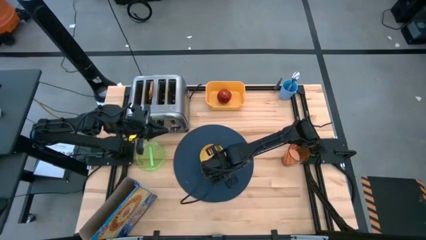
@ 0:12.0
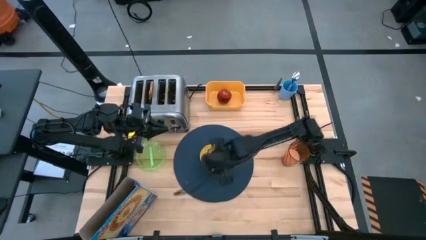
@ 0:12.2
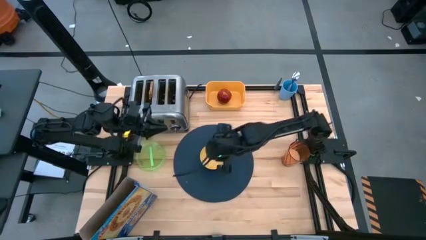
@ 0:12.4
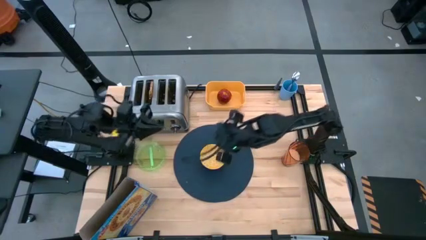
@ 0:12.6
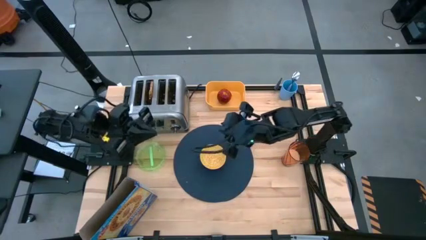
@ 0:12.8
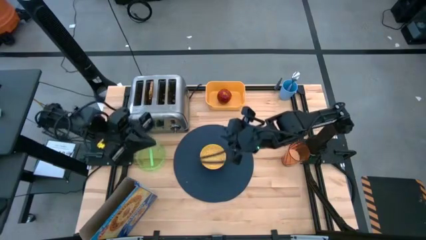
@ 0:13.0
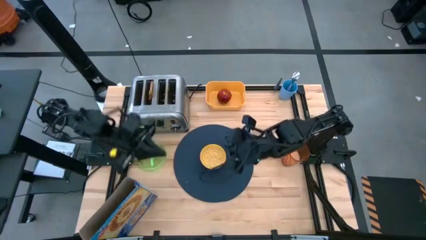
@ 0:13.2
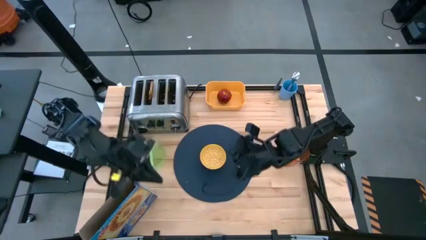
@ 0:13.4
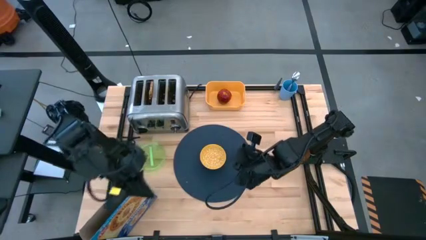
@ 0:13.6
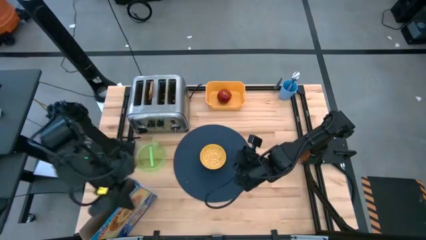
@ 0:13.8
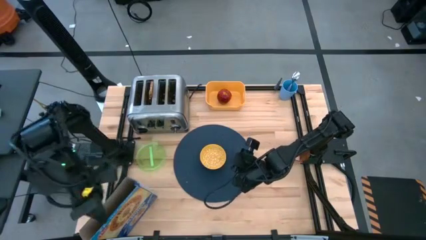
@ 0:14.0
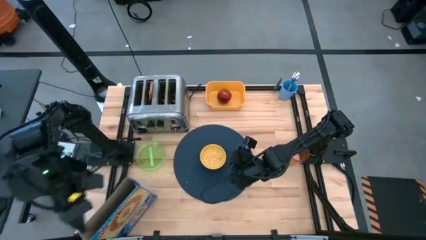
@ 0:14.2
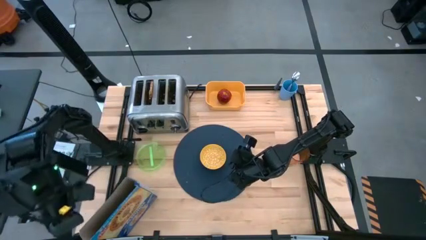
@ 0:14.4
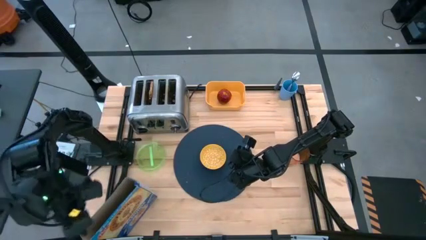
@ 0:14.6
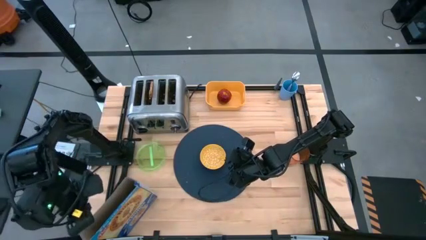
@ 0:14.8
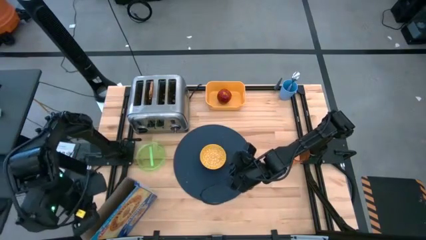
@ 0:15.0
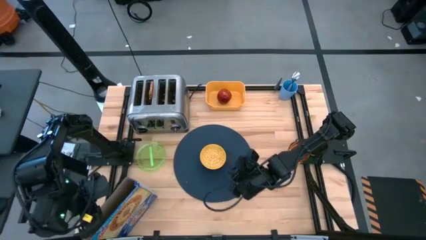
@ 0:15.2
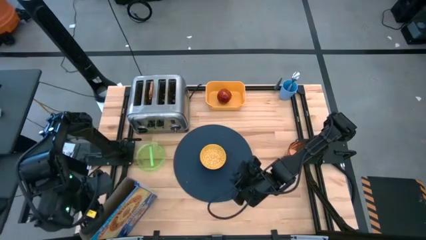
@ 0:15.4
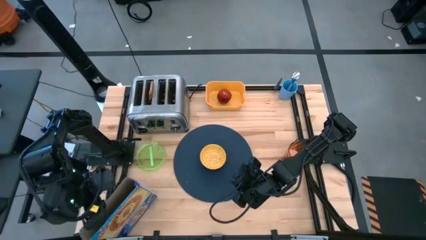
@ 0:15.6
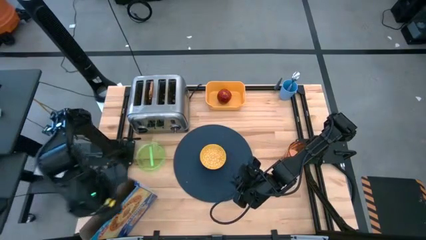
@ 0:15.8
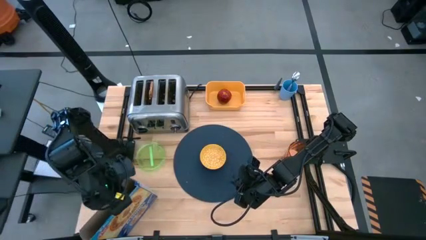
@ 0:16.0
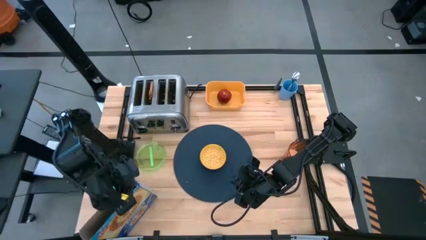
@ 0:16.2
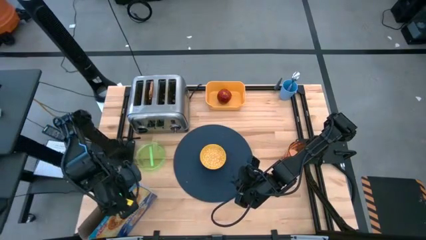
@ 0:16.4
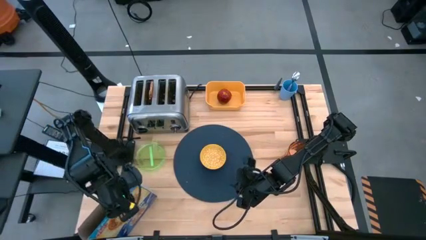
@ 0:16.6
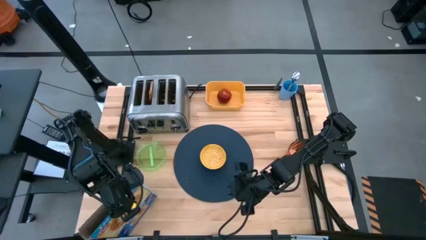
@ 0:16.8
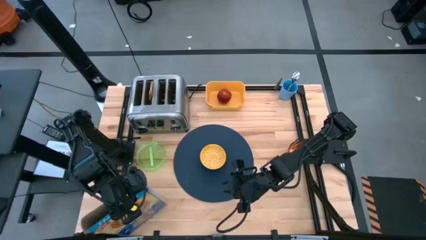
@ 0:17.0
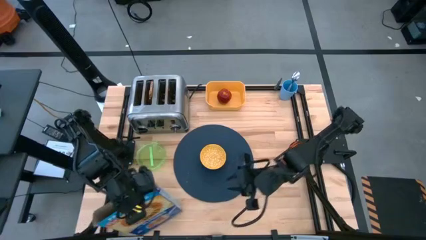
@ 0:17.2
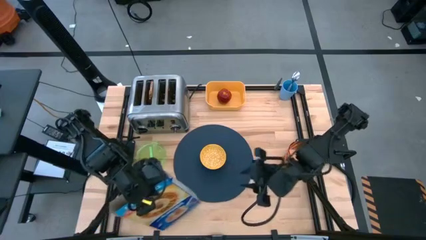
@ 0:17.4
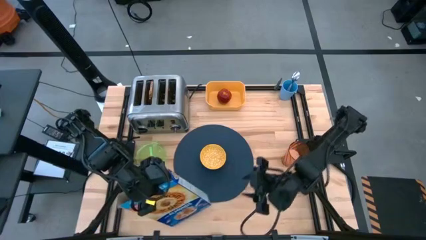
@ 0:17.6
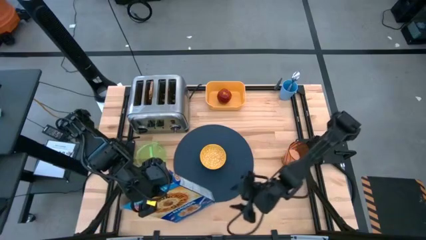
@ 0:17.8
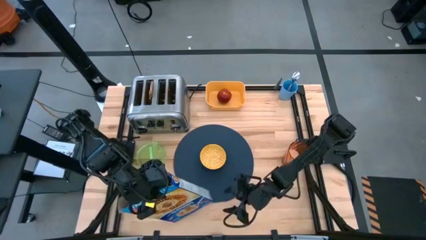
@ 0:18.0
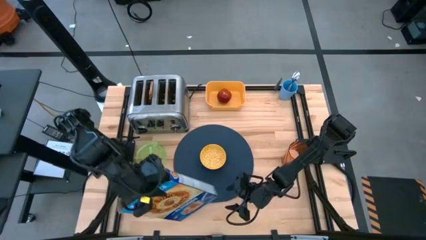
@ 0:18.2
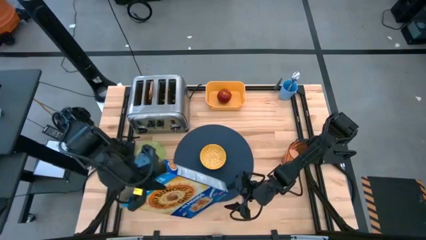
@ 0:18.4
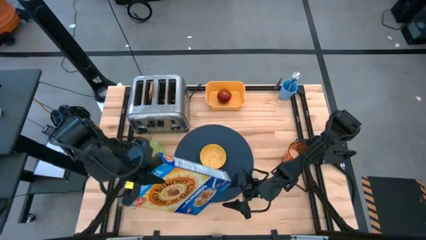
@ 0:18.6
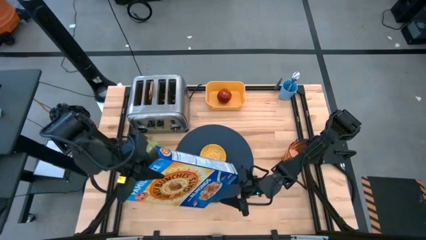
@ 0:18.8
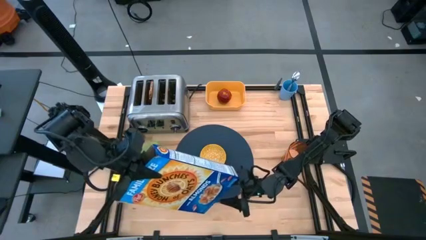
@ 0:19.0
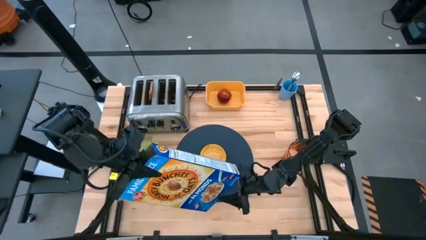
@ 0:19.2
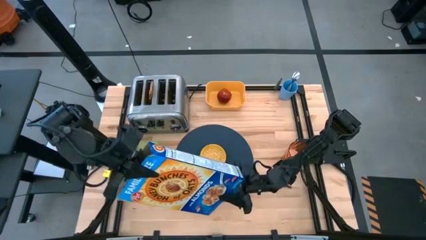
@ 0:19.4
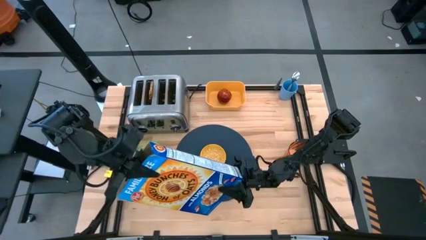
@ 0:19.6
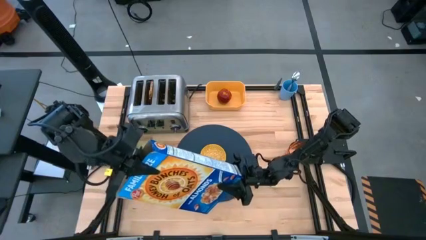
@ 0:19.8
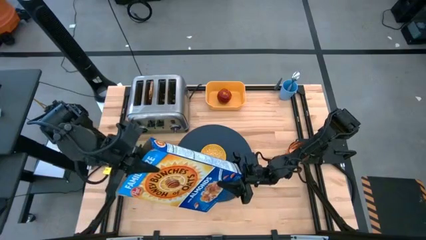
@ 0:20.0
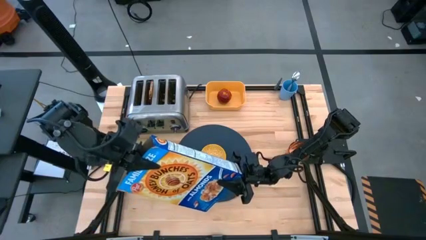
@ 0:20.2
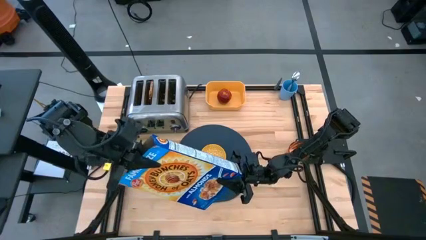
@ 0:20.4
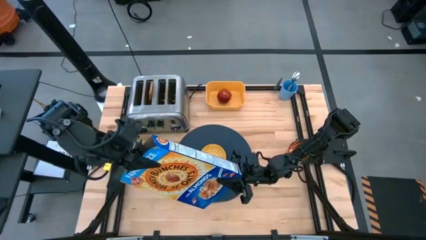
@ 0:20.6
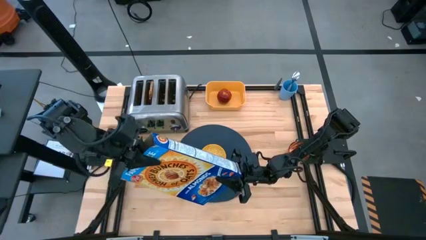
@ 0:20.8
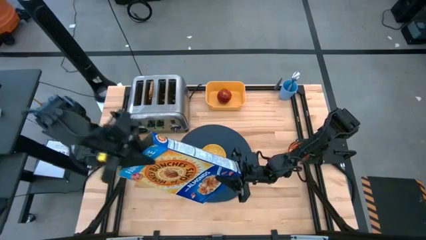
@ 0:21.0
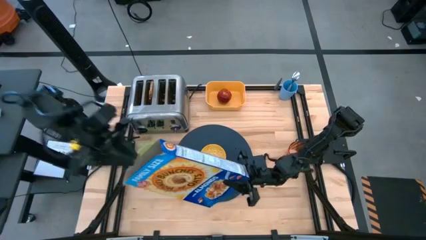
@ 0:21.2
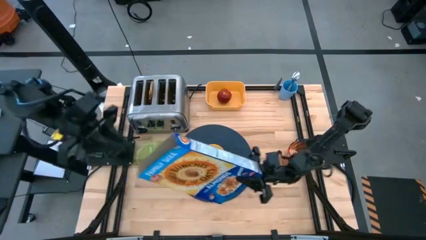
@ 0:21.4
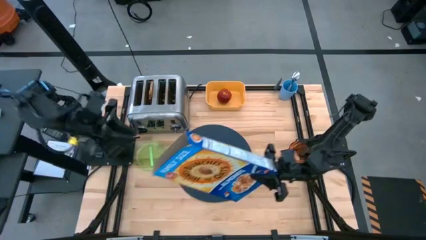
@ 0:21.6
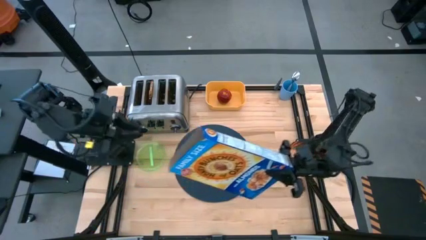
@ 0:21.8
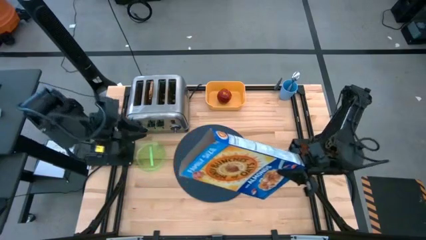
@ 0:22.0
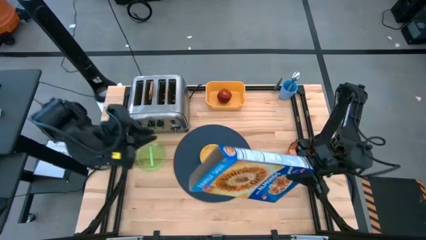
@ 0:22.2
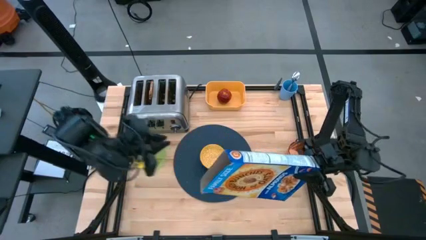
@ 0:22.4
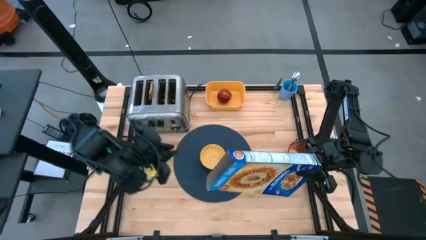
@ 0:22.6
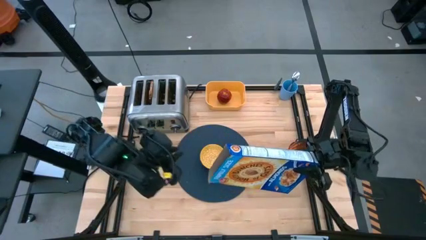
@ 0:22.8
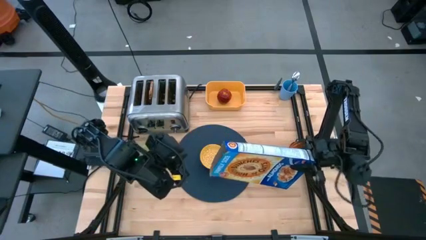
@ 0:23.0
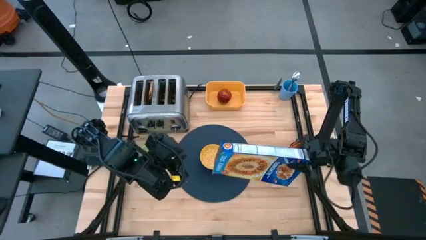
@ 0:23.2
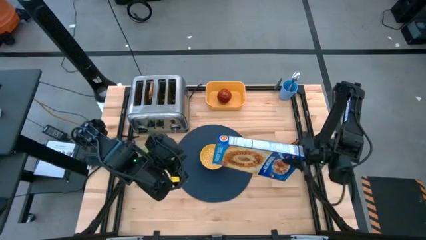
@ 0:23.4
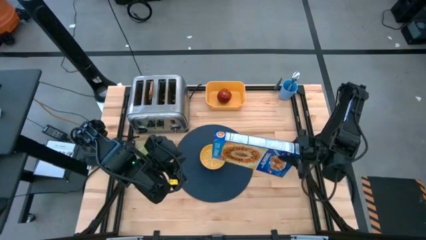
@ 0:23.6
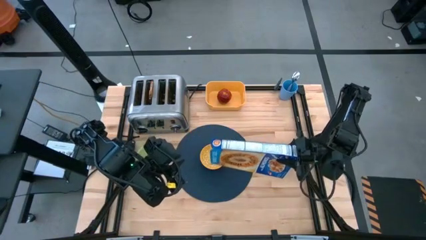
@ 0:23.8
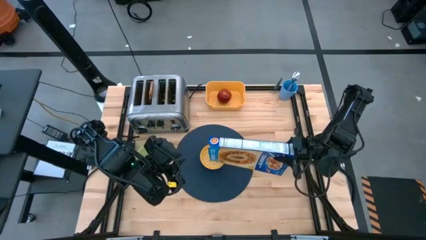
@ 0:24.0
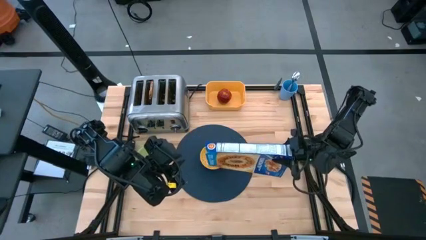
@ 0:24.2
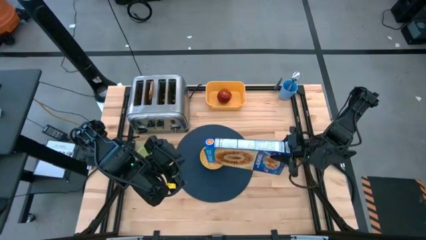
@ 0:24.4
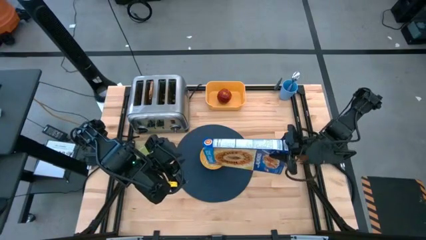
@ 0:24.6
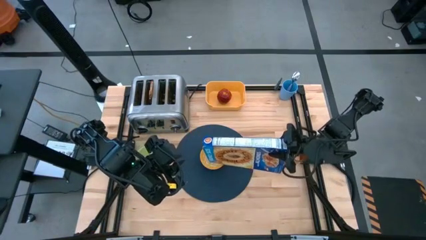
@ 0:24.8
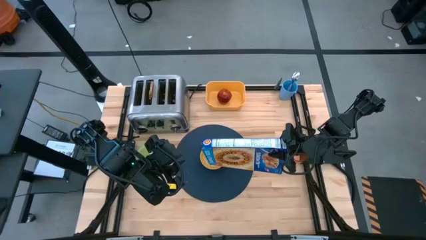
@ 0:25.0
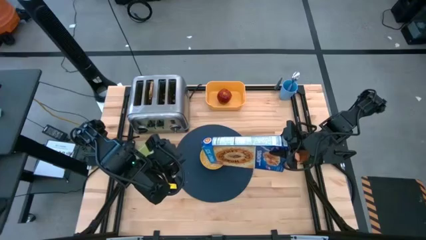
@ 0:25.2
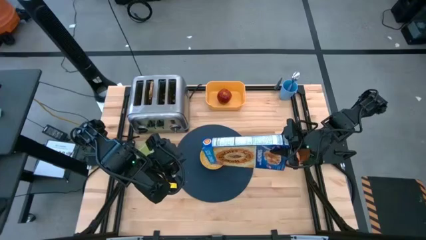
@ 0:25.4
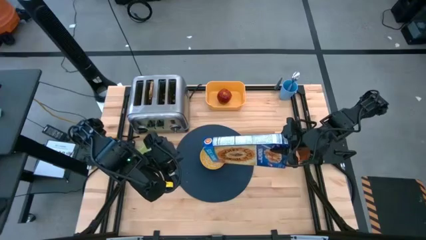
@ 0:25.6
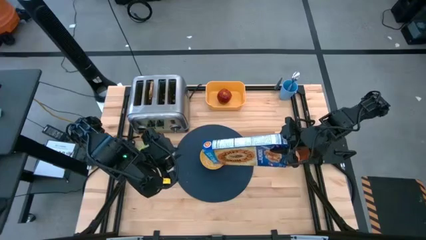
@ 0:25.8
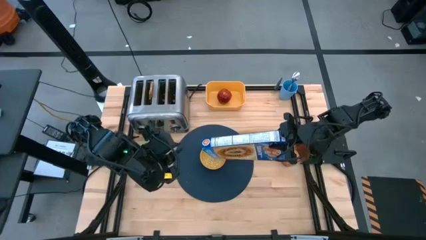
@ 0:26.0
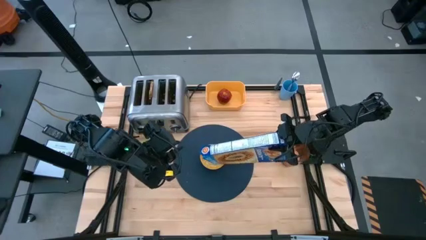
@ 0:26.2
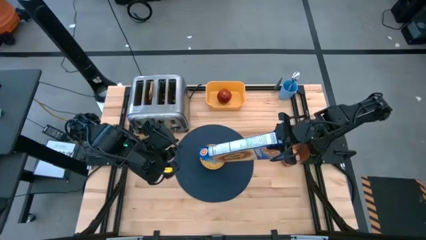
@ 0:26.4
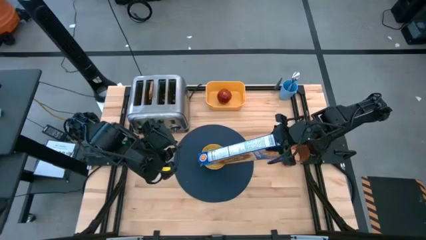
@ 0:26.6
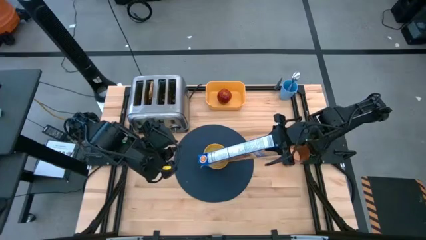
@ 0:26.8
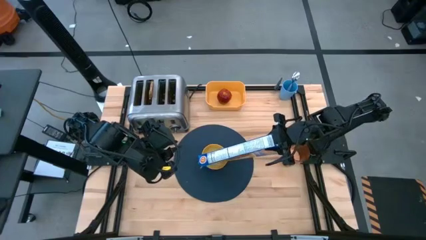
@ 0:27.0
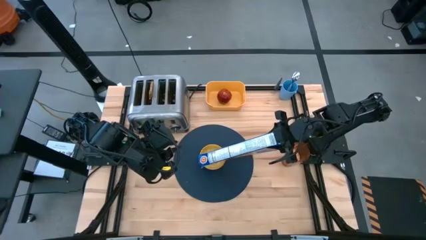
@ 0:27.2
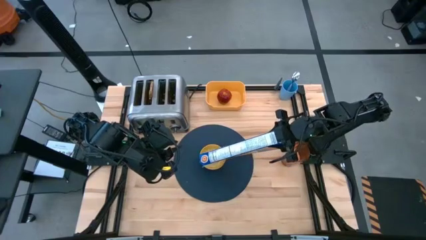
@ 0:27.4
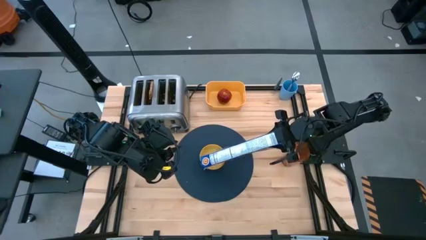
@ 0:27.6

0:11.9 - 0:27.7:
Task: Arrange a breakfast setting
Pour the cereal into the blue and yellow bowl
